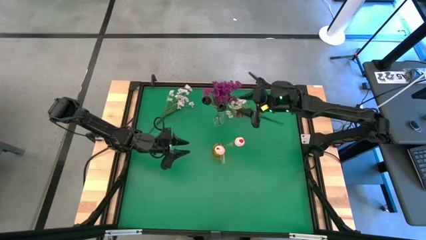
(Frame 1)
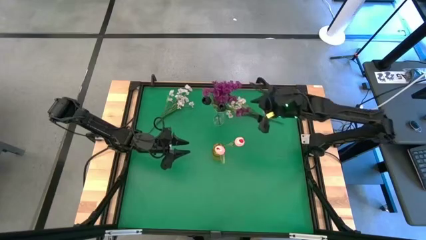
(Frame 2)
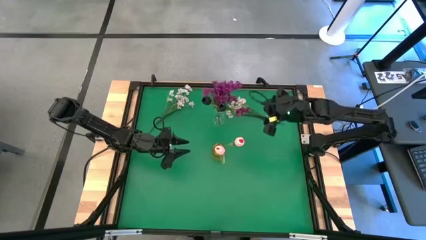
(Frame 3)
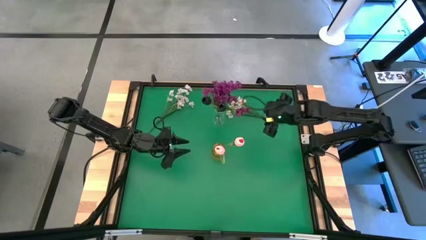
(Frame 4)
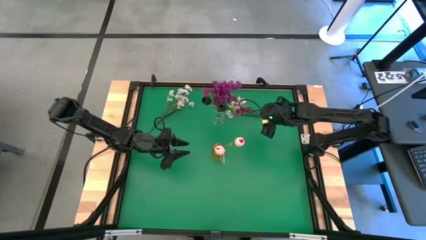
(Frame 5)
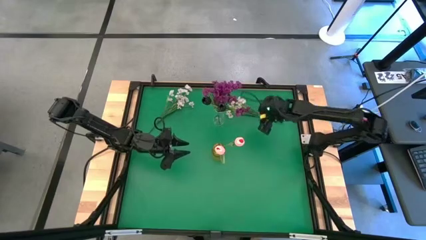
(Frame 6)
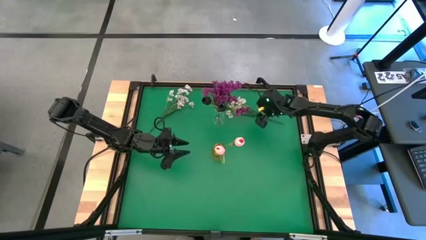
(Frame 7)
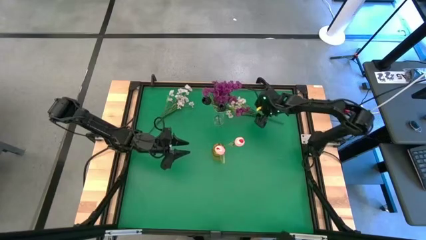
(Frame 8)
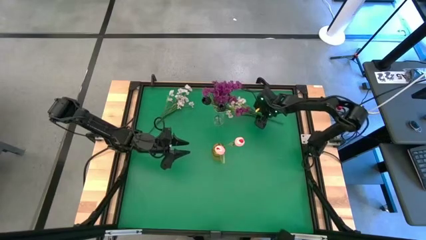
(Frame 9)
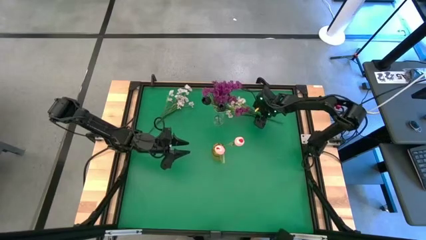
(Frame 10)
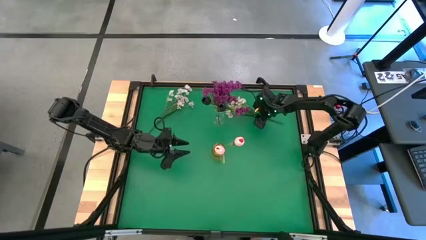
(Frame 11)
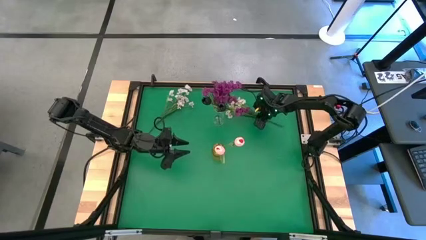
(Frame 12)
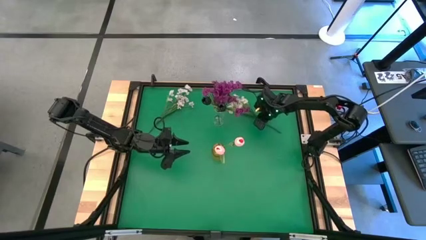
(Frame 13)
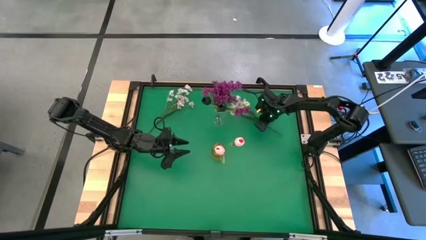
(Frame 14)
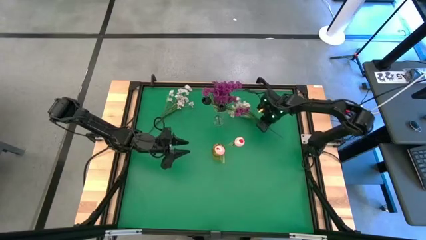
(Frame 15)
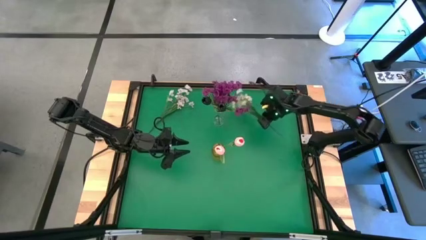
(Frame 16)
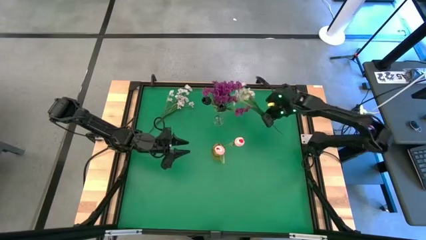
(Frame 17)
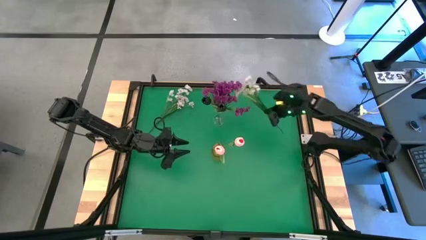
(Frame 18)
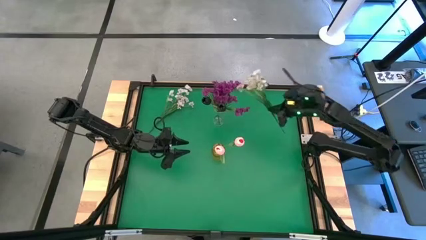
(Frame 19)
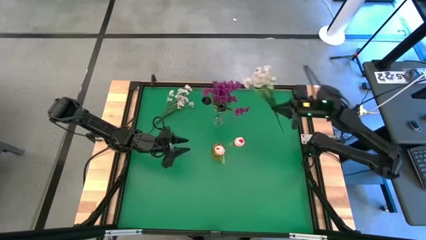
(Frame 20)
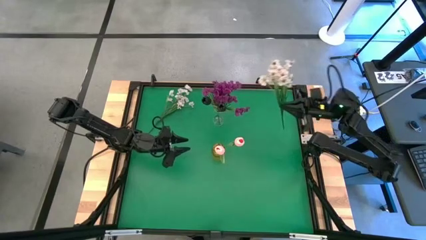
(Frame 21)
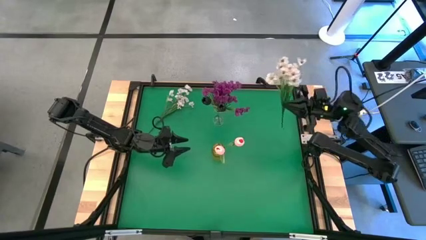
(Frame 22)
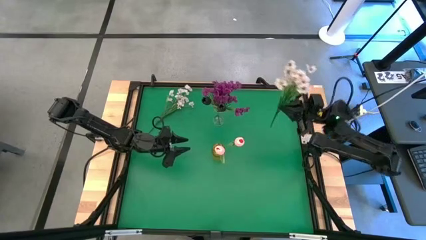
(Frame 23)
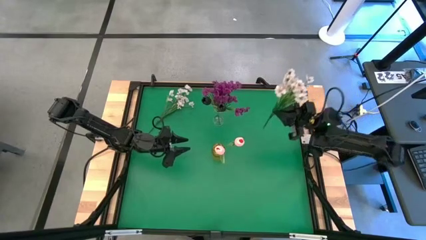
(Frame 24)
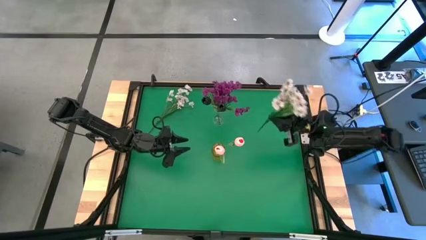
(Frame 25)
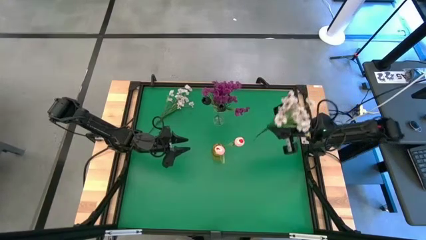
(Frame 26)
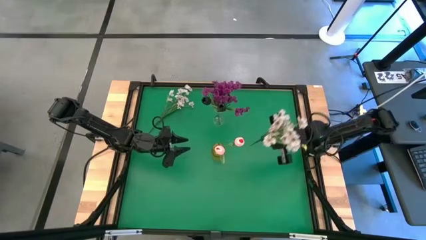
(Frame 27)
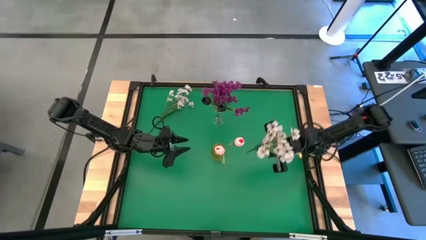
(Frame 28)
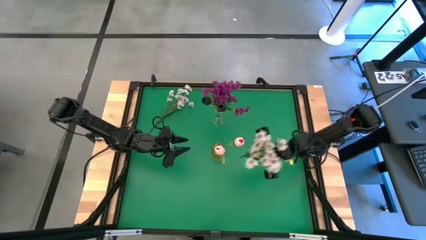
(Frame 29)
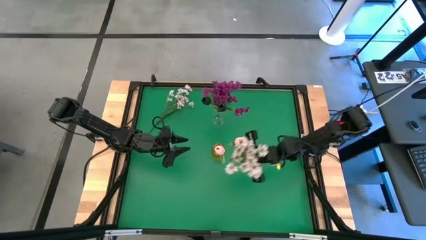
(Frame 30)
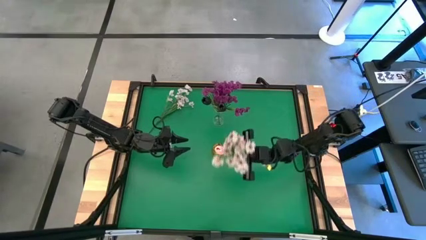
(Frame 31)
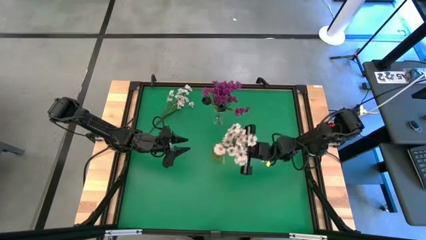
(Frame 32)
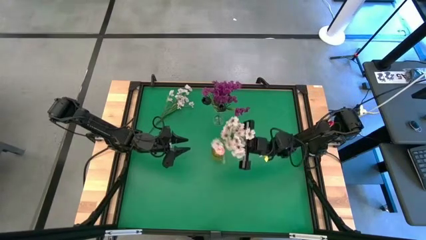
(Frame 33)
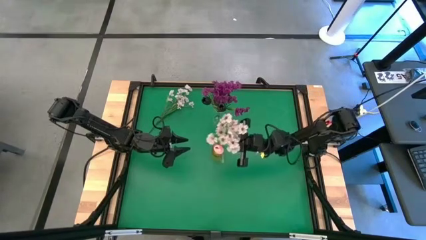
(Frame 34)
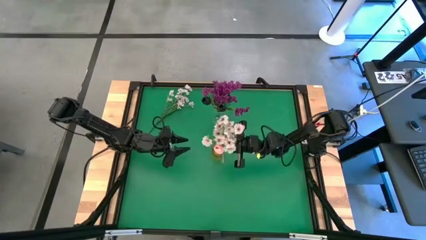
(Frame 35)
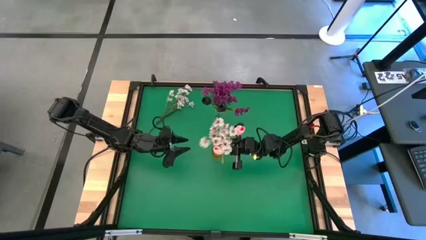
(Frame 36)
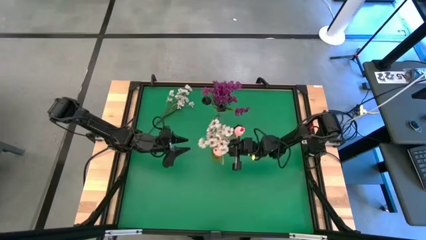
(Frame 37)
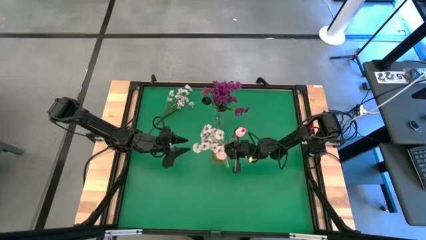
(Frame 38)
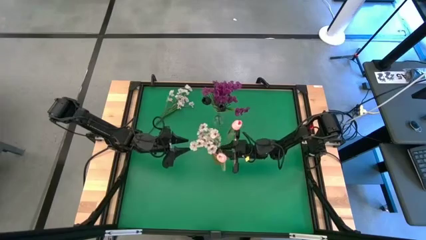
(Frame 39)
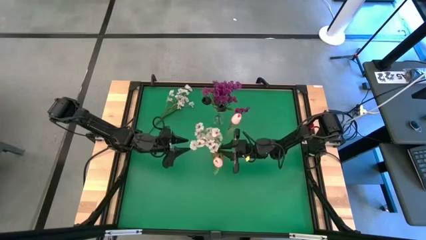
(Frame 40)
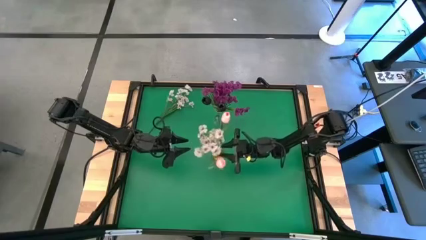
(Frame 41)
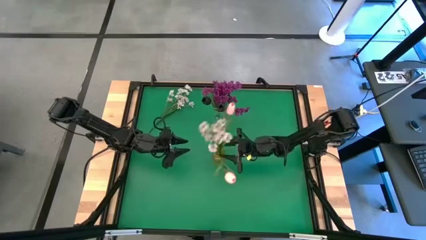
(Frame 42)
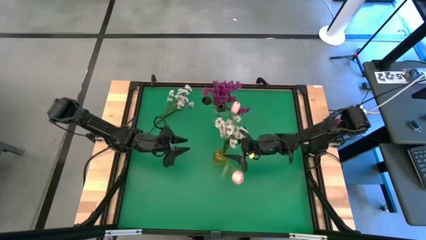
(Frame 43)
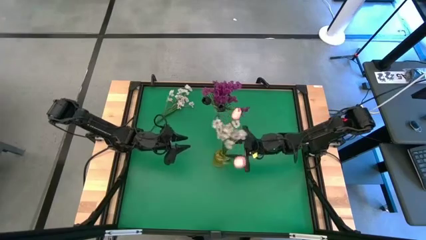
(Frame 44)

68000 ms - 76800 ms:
Task: Sort flowers into vase by color
Put the right white flowers into the yellow vase

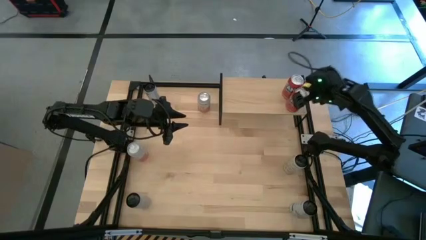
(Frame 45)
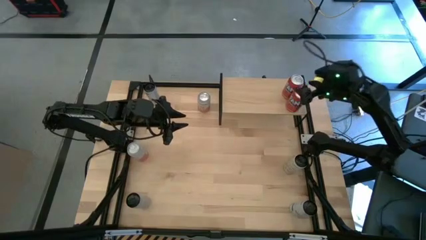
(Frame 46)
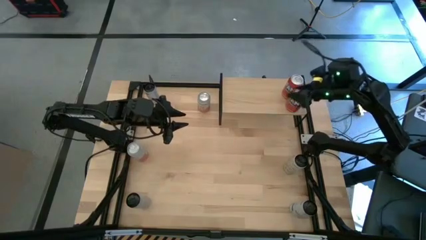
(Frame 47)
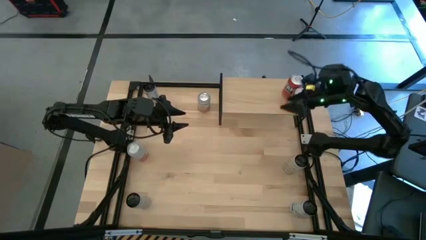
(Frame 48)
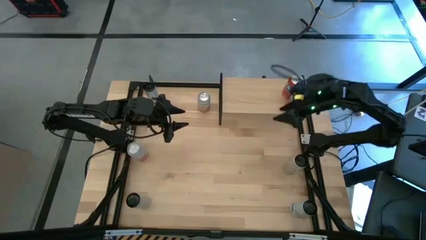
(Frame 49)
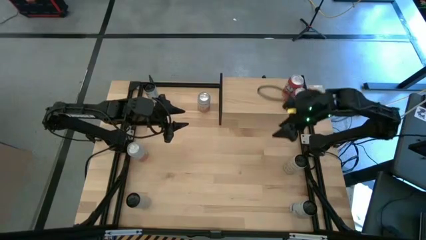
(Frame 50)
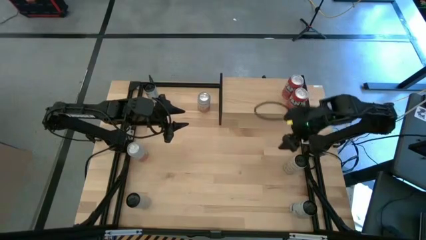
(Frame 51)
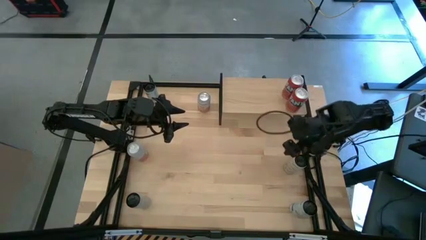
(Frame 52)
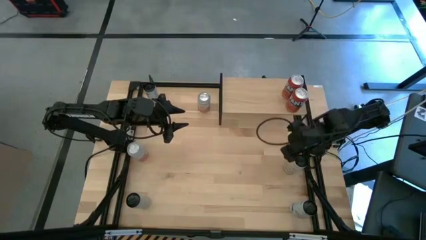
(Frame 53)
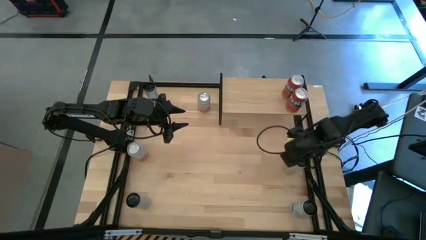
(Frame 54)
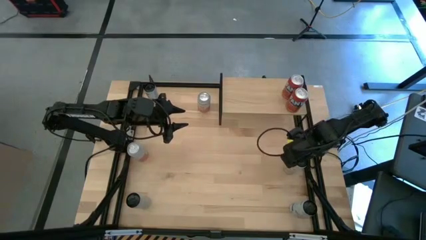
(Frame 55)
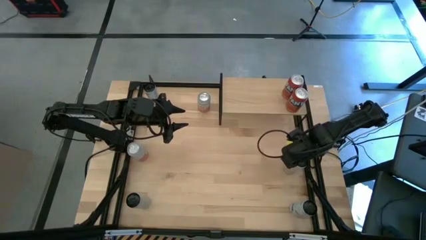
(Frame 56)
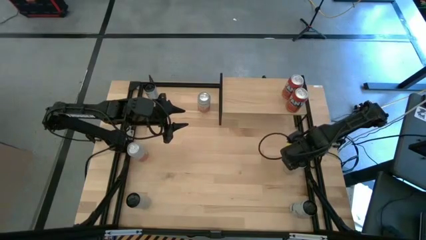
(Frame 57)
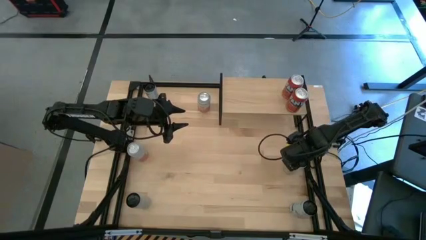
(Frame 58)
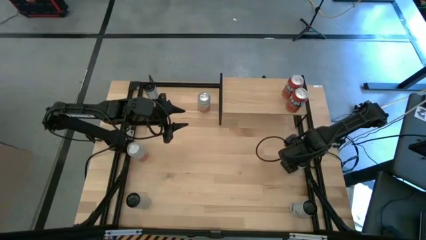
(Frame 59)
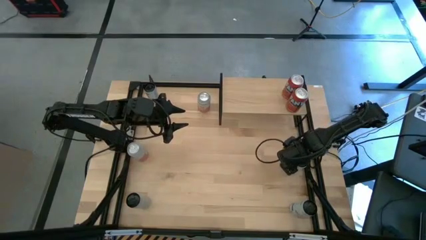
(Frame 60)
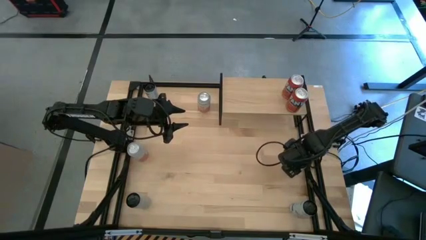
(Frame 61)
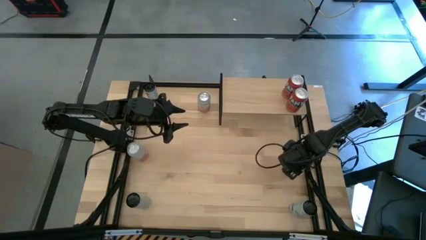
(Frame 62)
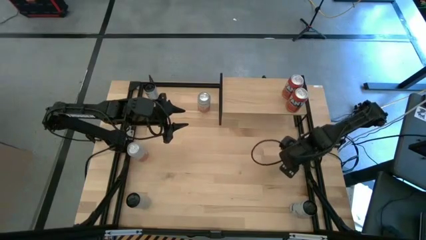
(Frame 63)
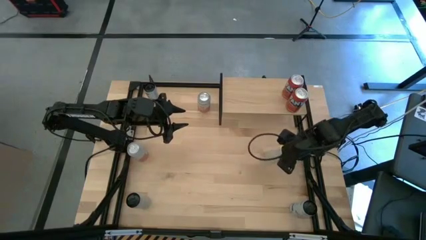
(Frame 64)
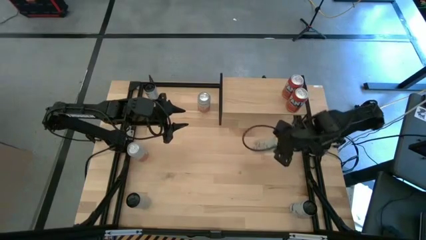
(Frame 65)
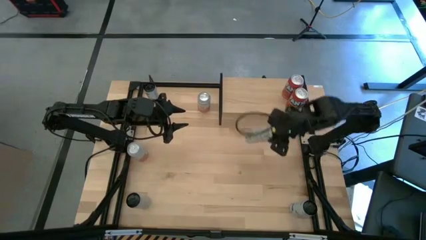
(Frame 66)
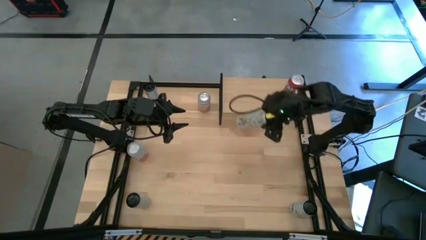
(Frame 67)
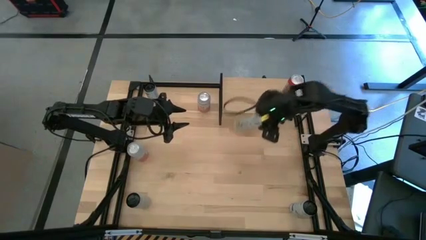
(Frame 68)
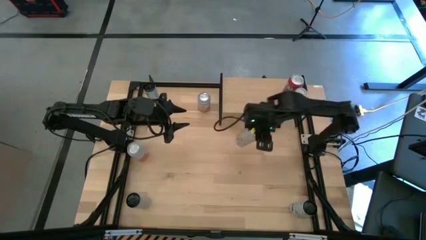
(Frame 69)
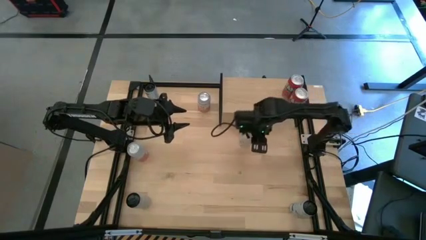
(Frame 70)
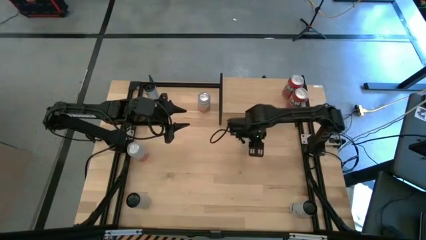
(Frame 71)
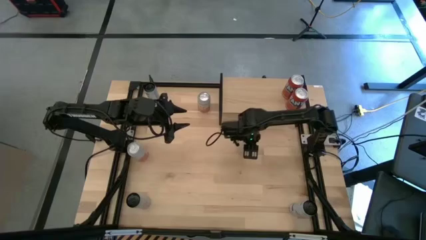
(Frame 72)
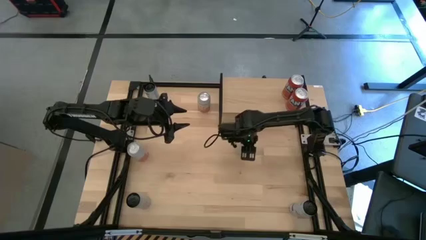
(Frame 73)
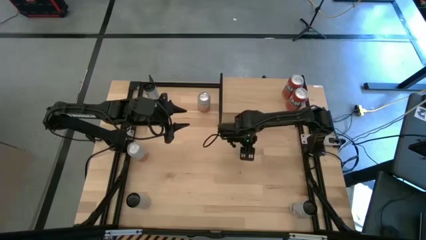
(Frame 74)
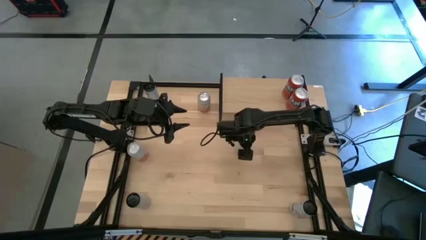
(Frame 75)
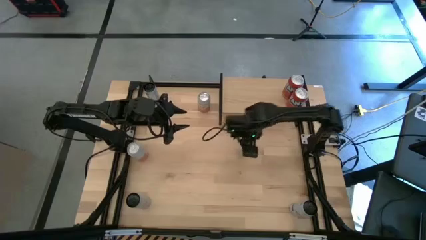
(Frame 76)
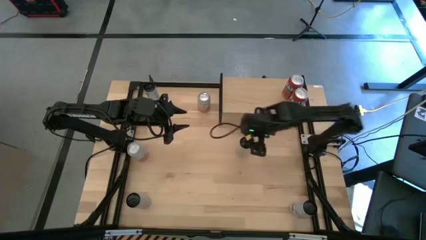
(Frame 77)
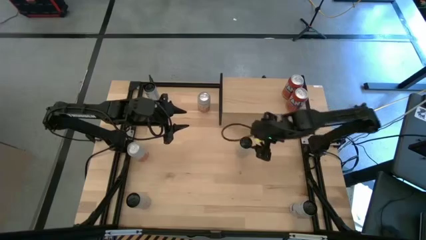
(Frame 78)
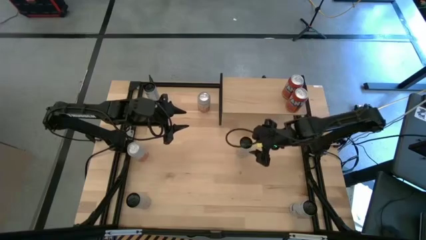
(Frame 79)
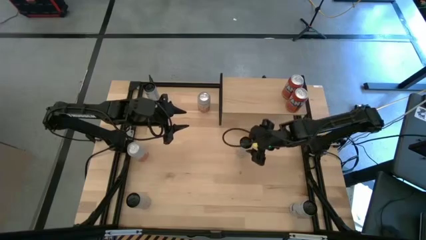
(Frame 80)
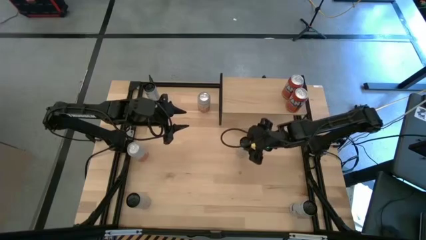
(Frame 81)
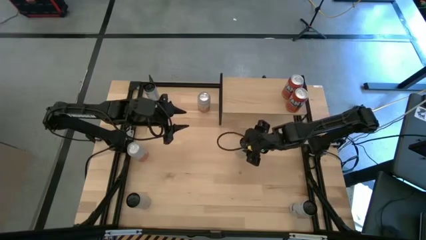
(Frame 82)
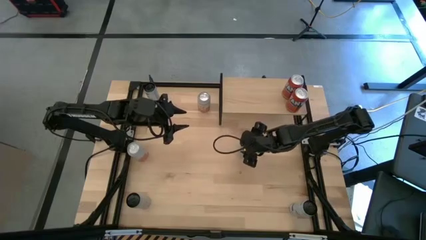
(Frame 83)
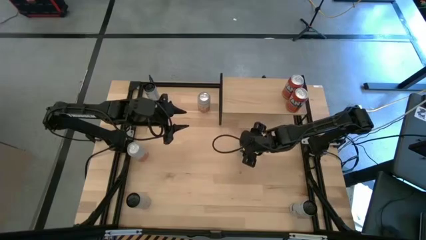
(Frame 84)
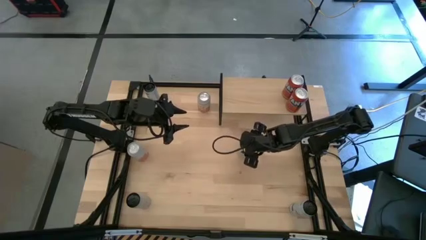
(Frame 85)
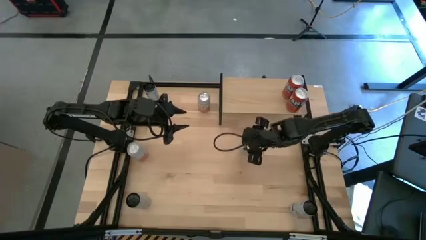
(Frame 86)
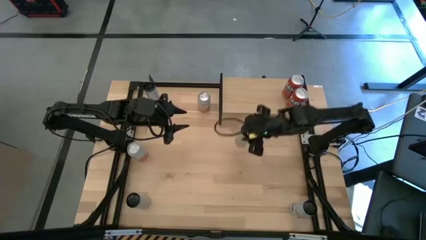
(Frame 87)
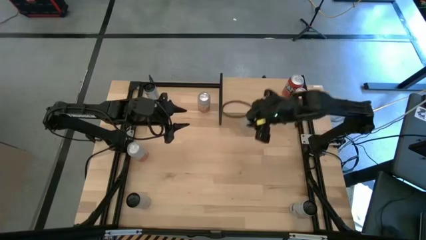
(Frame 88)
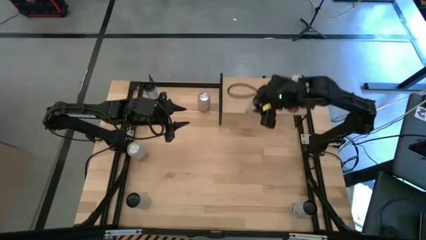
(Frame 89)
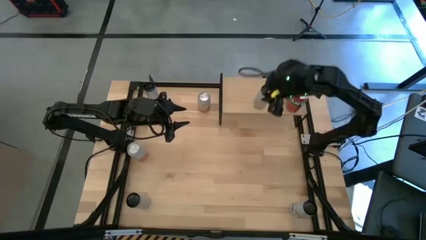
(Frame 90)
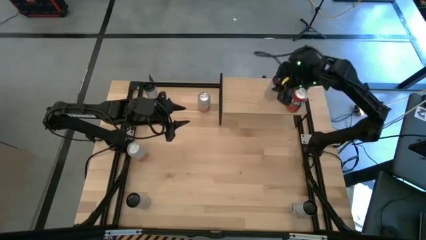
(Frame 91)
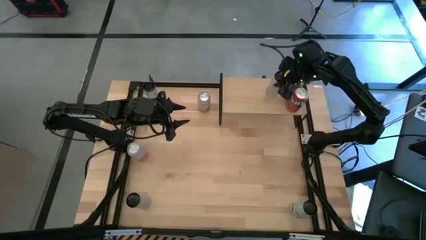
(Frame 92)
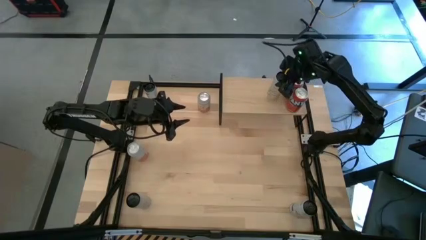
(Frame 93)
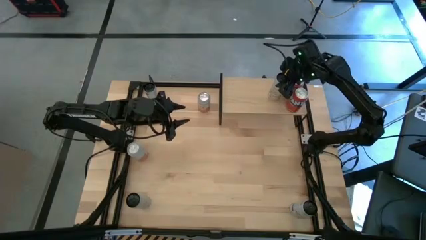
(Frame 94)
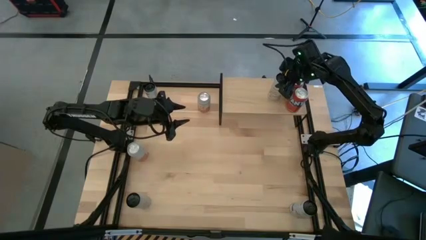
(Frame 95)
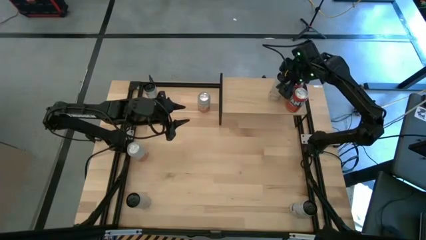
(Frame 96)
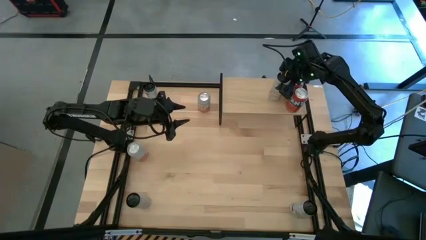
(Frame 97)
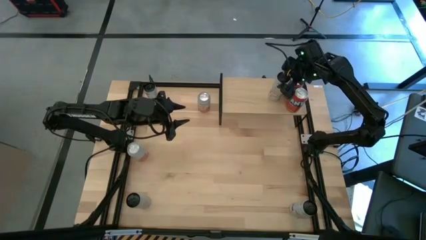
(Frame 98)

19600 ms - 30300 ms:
Task: Place canned beverage on shelf
Put the right white yellow soda can on the shelf
